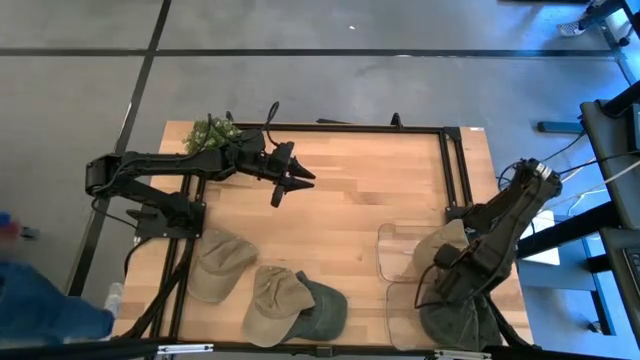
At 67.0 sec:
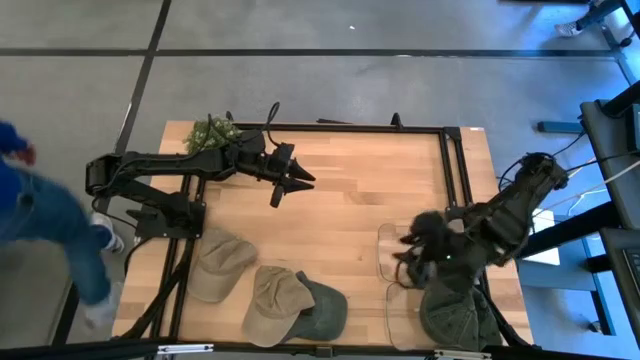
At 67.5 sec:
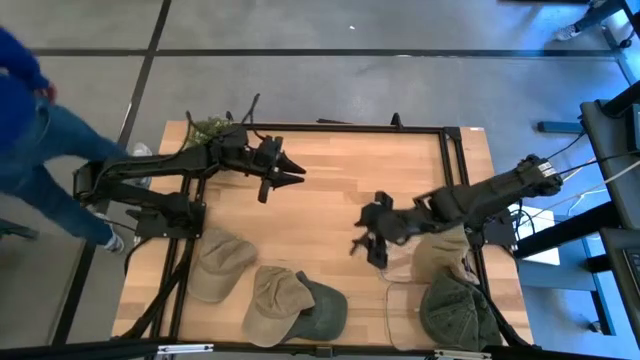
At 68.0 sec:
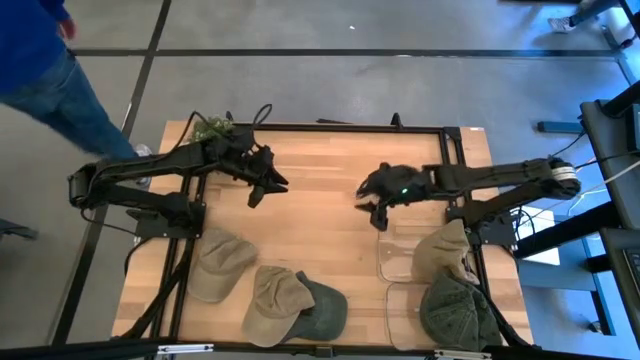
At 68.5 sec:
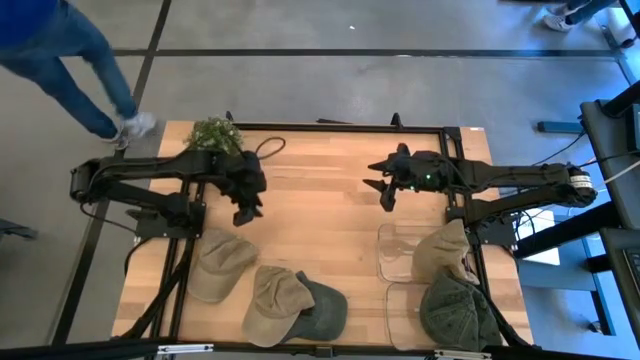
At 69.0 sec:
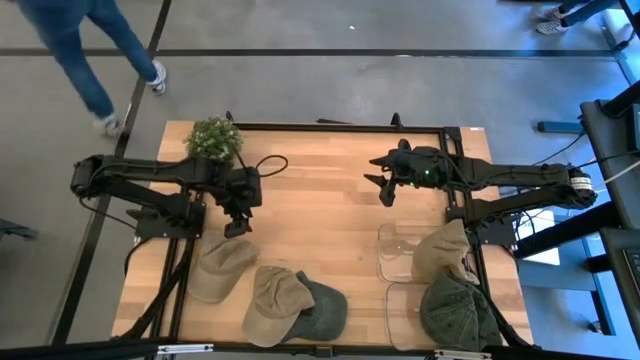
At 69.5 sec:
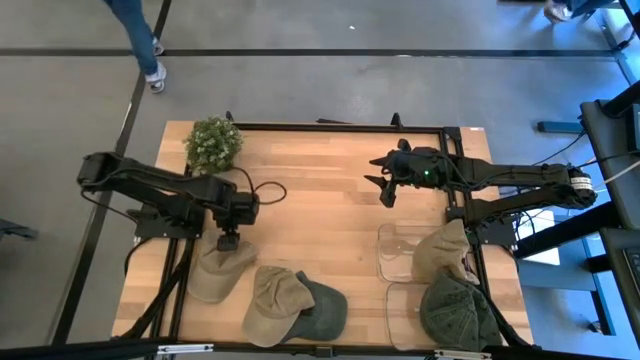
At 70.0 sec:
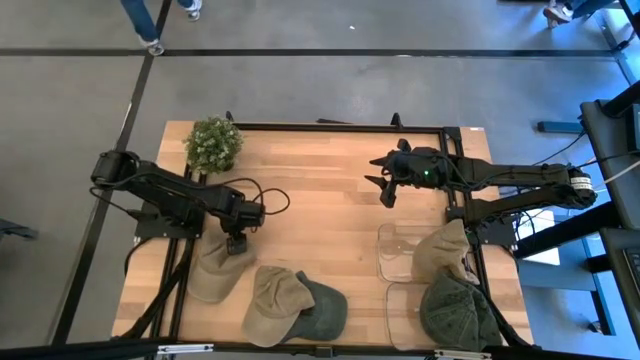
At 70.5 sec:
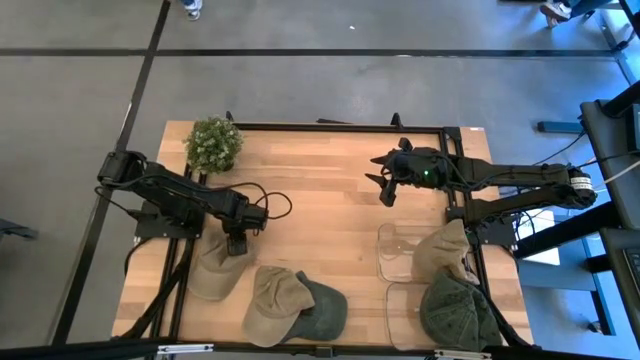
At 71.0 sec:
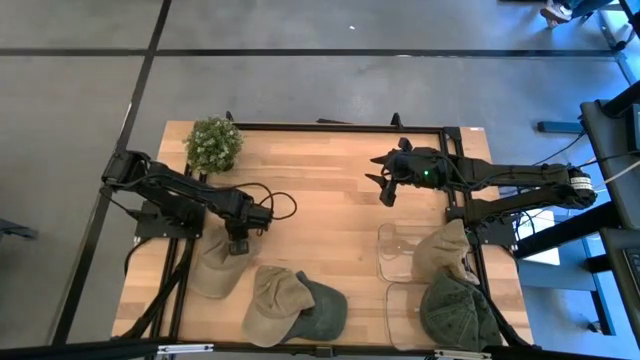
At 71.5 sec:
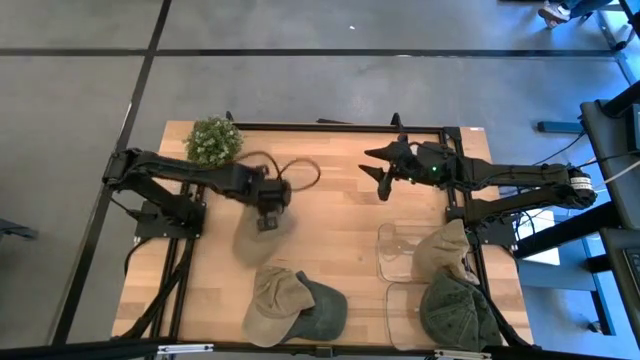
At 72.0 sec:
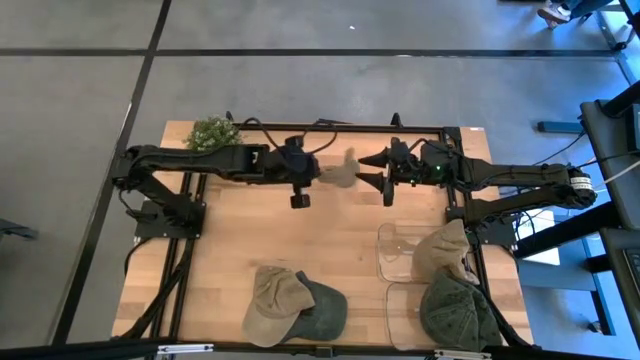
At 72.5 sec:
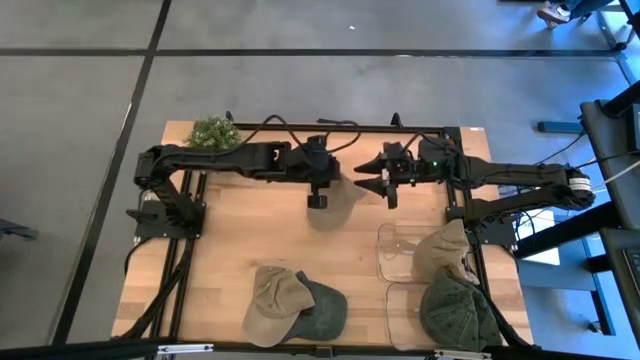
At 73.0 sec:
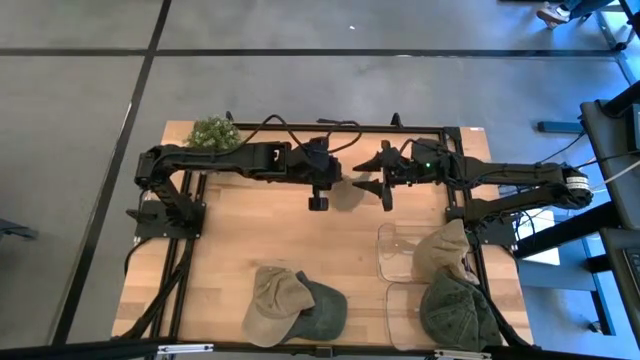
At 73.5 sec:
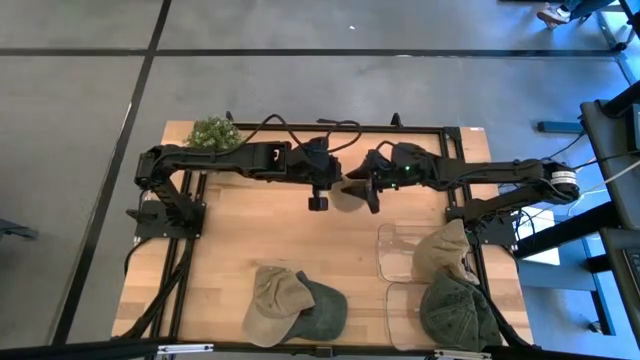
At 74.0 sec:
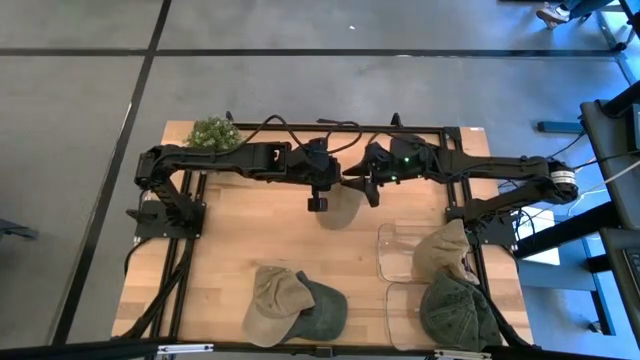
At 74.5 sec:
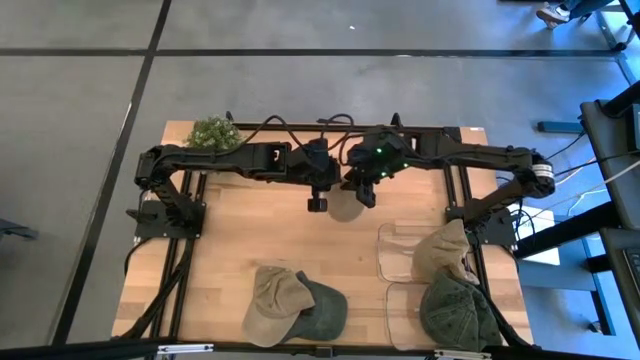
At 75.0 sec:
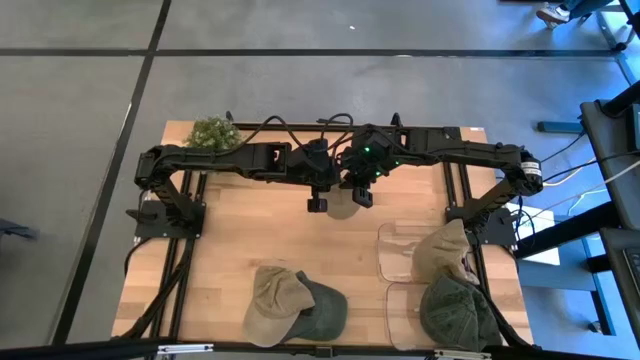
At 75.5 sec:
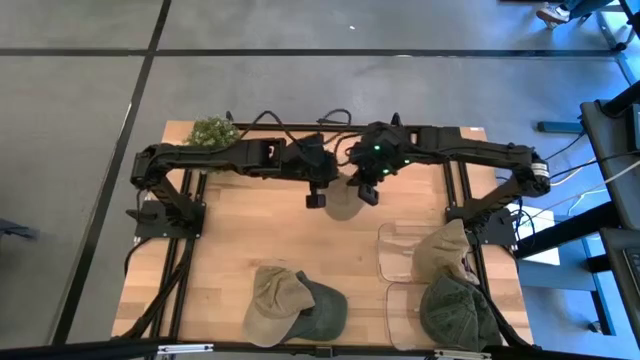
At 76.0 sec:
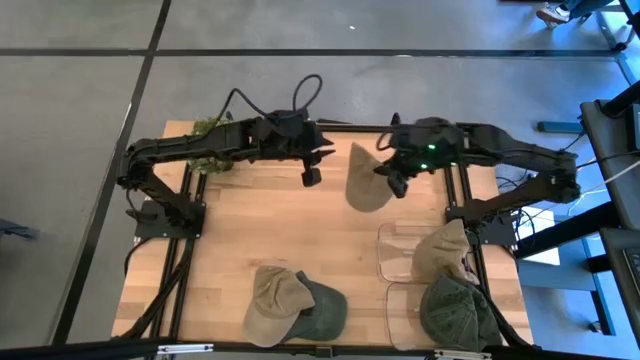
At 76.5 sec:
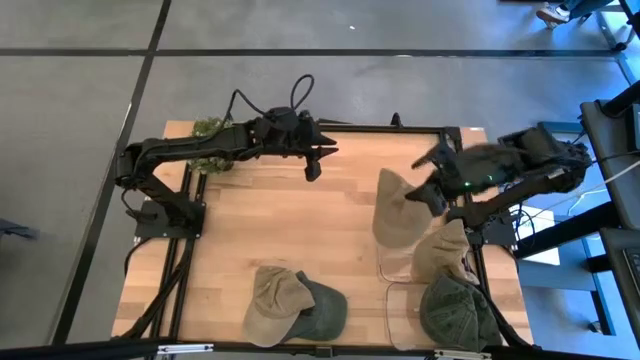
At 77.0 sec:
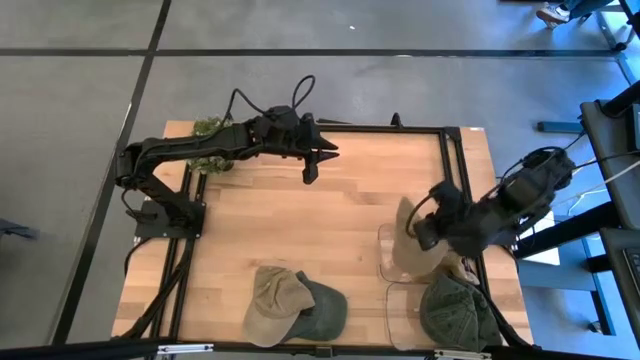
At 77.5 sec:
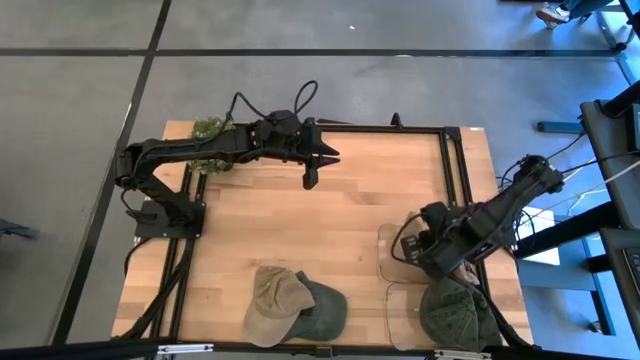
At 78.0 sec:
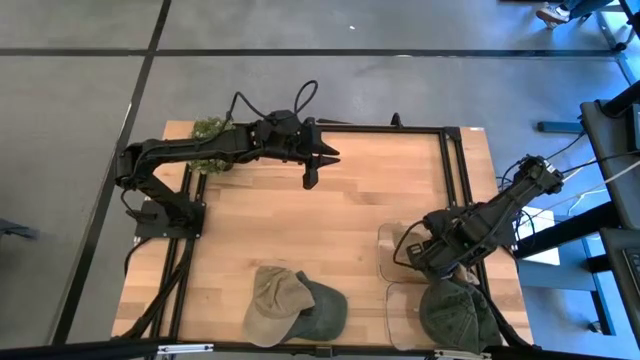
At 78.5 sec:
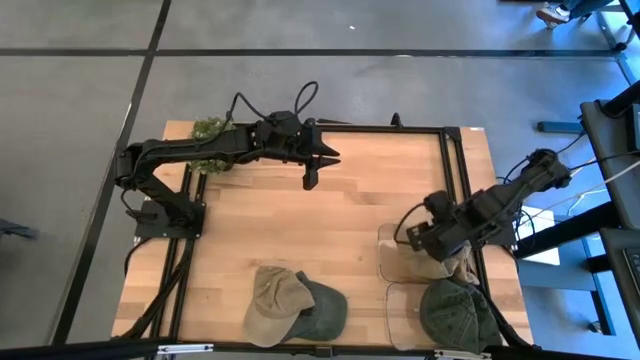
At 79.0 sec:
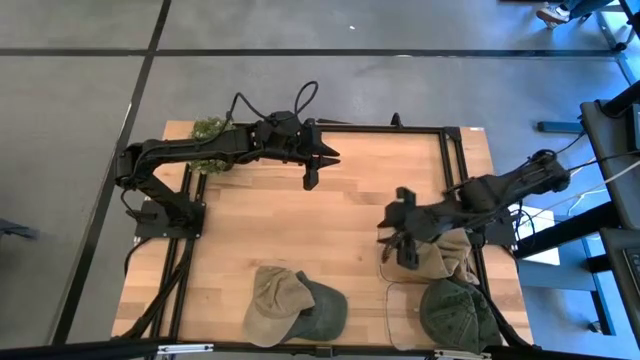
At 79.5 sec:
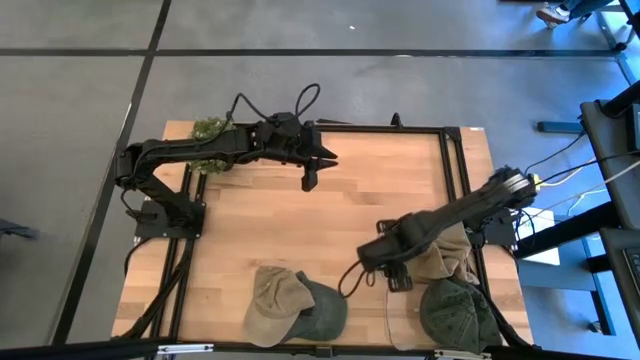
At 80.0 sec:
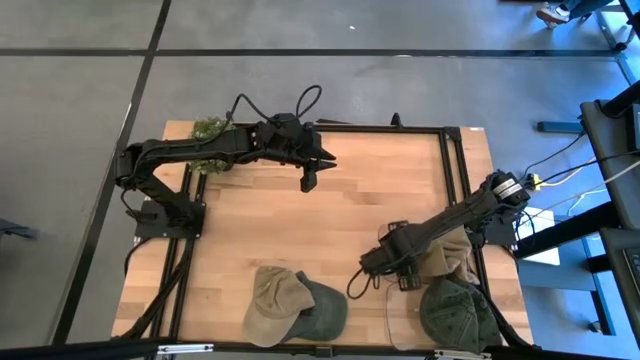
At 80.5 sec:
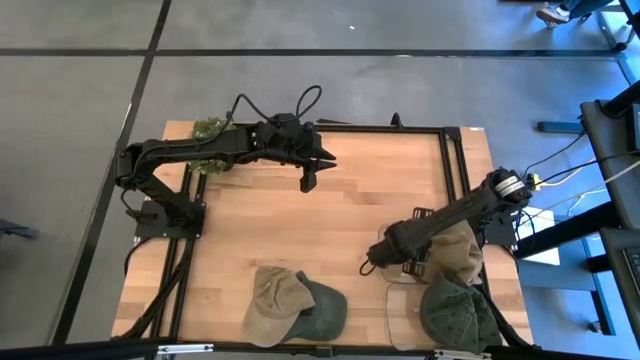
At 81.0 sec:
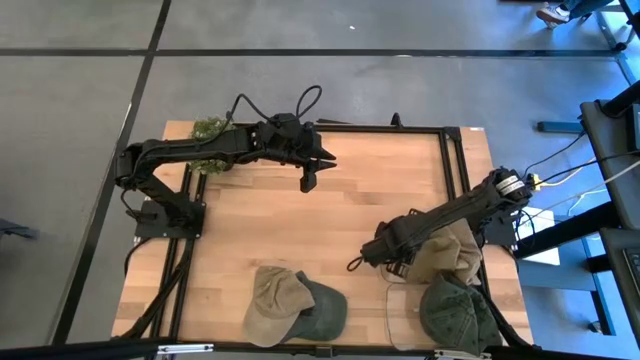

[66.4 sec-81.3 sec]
Task: Pick & Place hat
Put the left brown cap into the top transparent bin

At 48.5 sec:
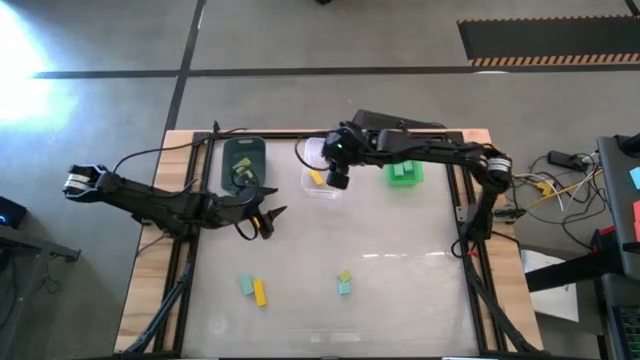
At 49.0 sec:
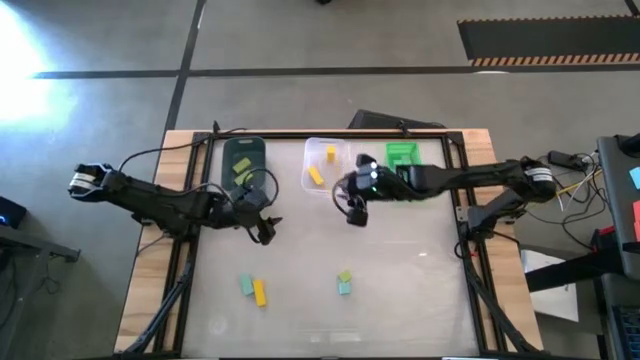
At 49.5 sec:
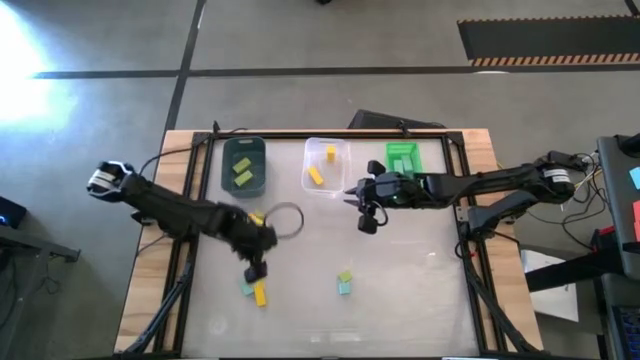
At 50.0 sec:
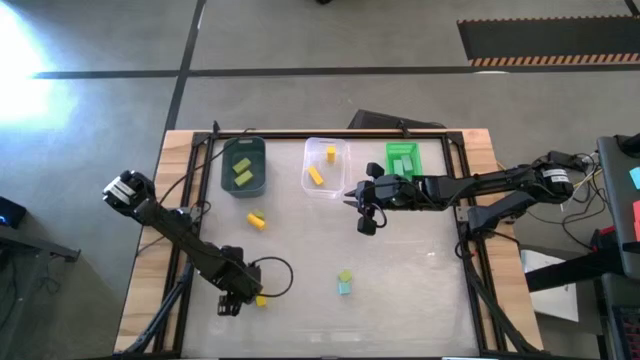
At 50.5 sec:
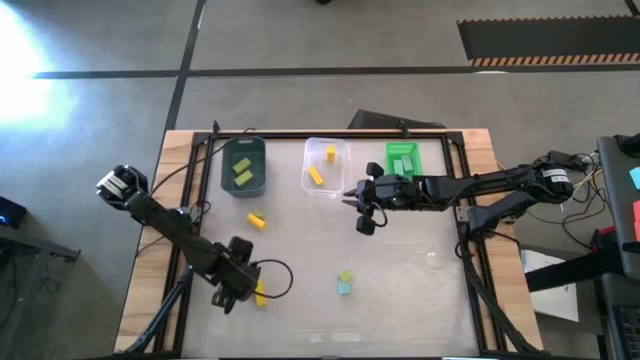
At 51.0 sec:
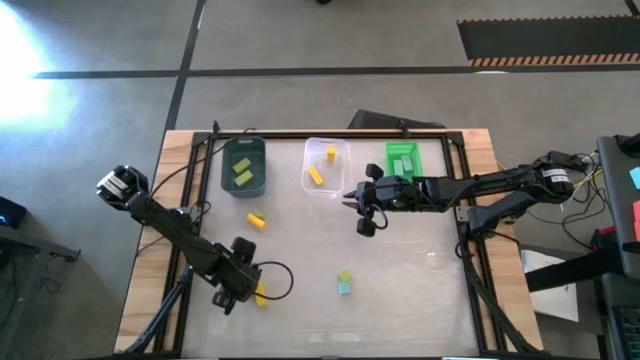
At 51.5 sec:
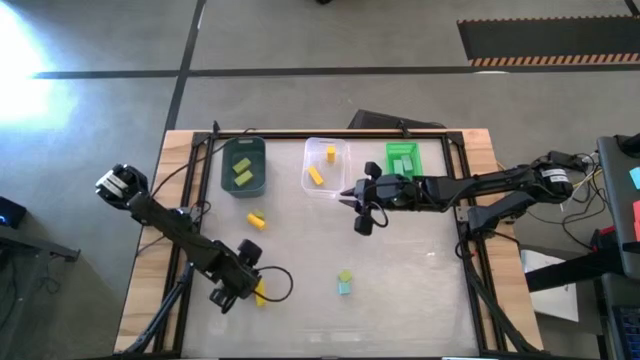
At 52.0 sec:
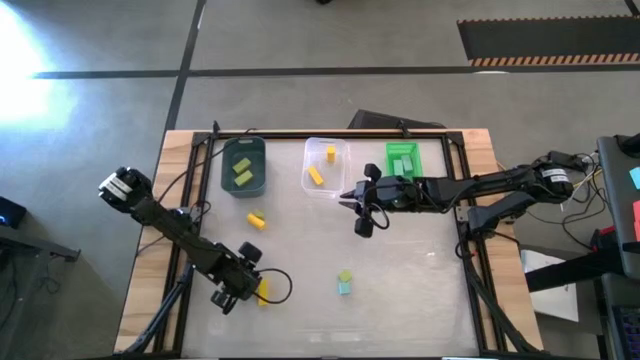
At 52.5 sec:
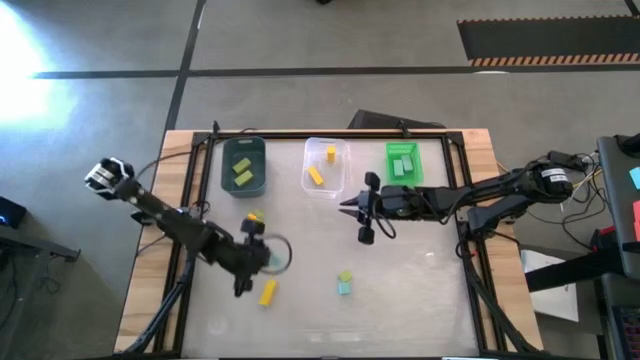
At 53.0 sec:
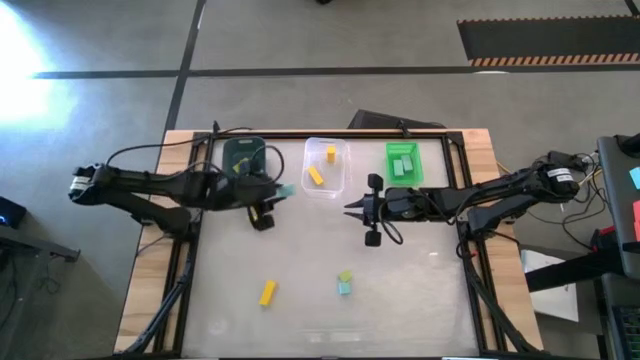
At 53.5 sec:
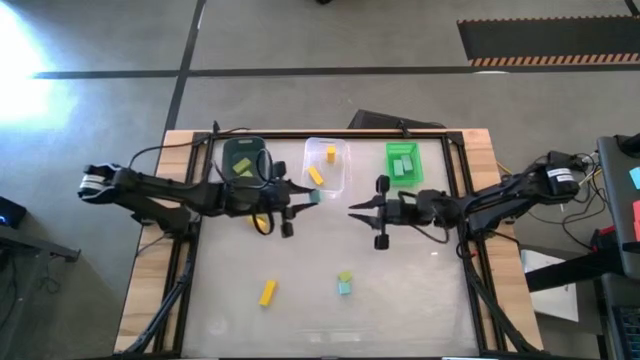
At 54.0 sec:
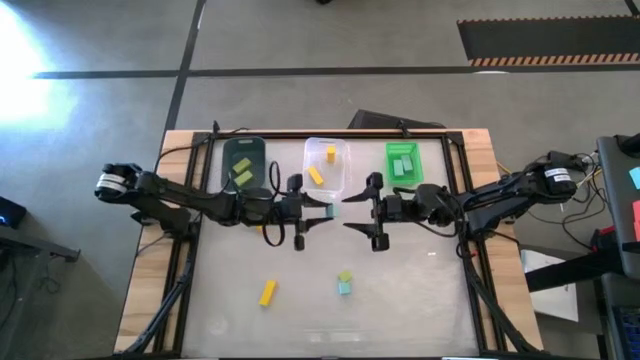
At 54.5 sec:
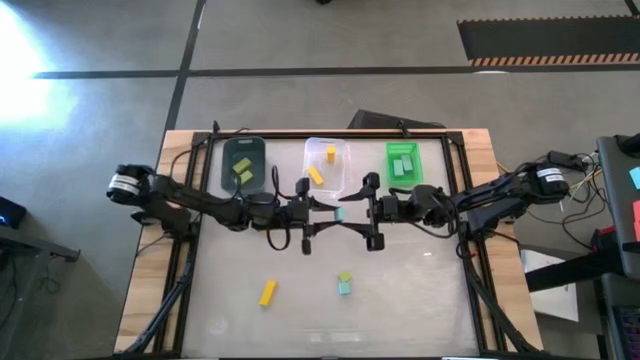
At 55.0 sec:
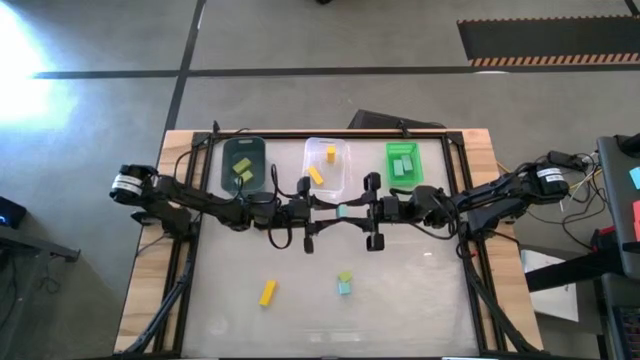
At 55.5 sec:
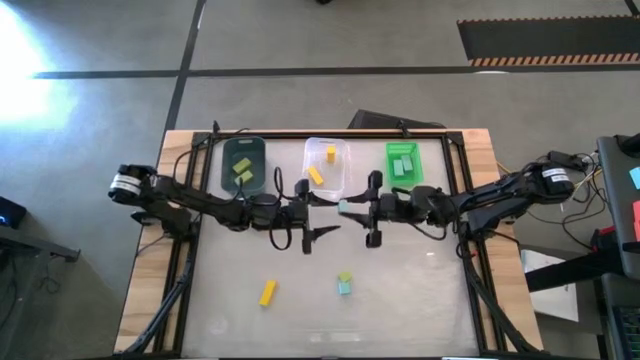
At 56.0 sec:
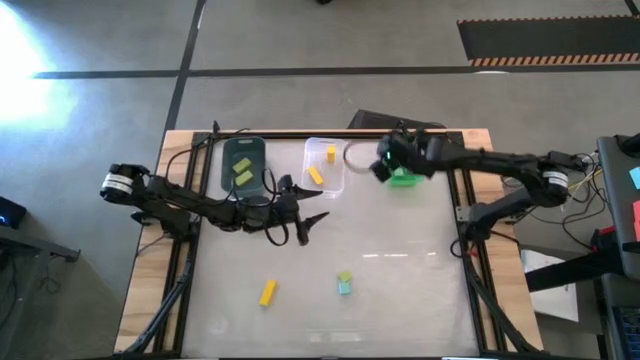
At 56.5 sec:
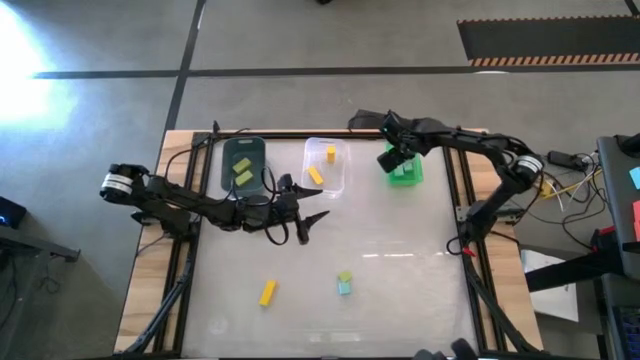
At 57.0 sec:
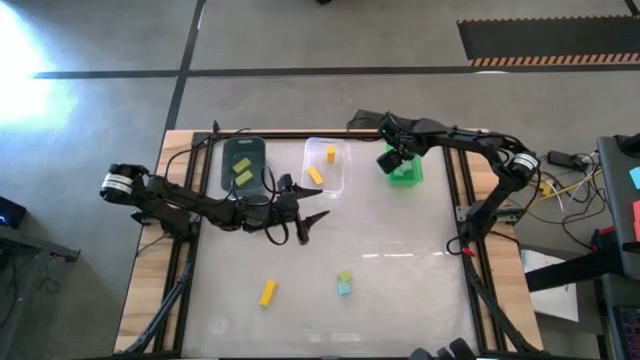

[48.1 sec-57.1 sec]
Task: Sort & place blocks by color
Put the blue block into the green bin
